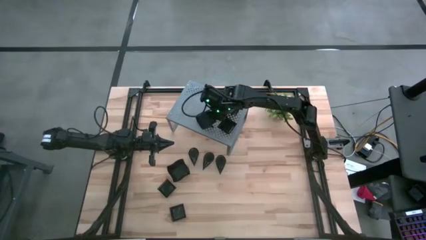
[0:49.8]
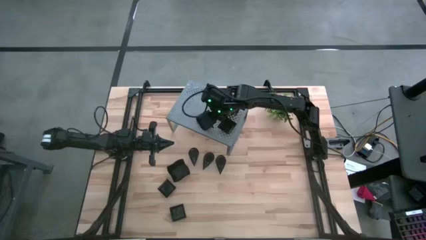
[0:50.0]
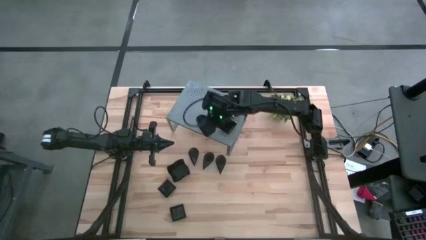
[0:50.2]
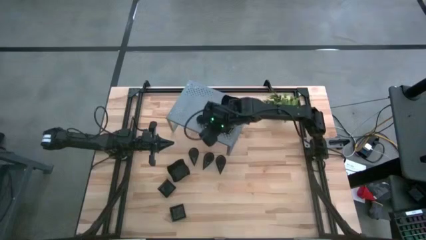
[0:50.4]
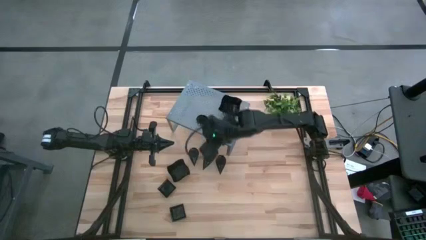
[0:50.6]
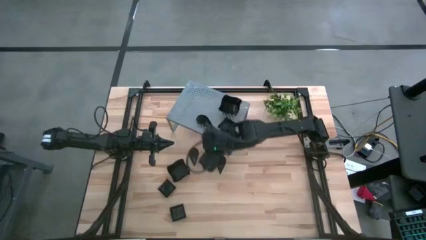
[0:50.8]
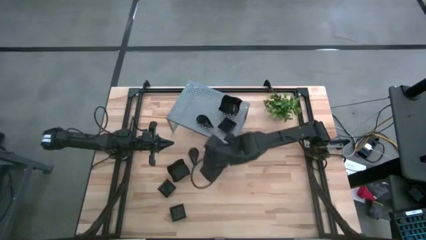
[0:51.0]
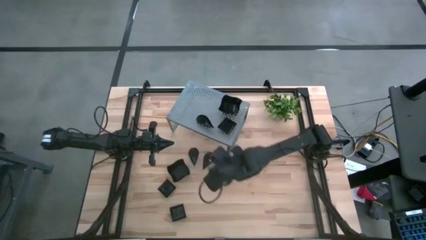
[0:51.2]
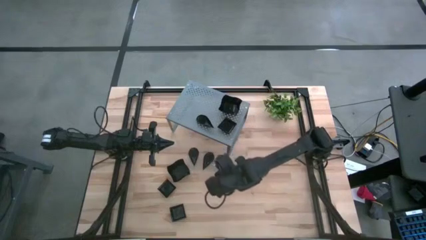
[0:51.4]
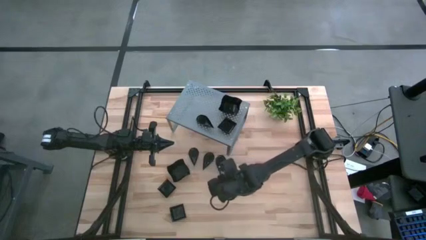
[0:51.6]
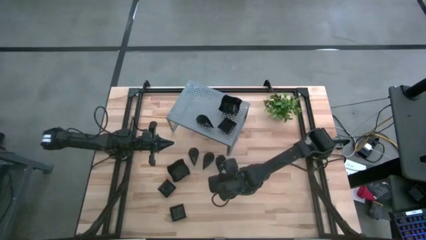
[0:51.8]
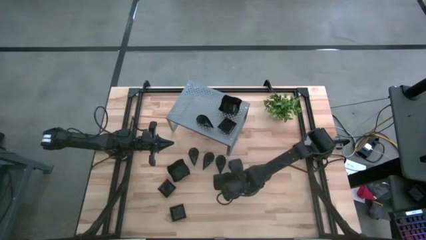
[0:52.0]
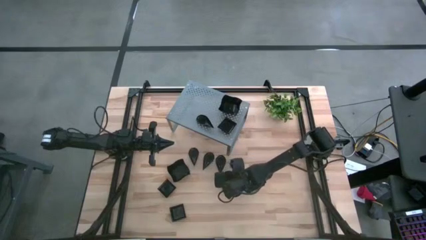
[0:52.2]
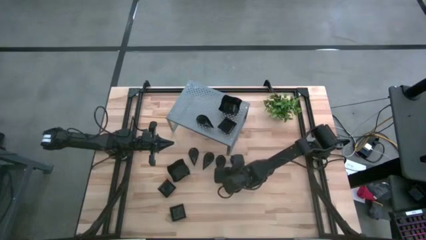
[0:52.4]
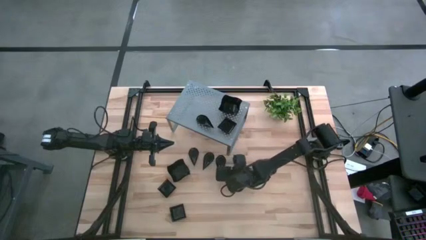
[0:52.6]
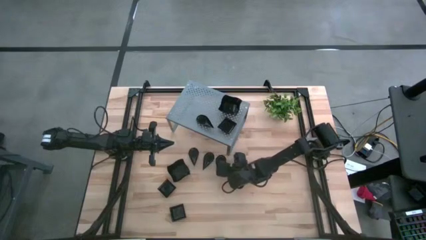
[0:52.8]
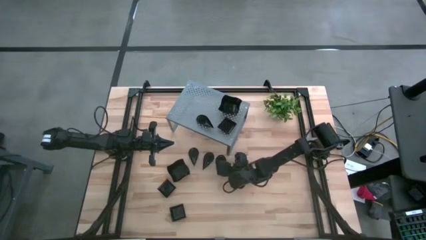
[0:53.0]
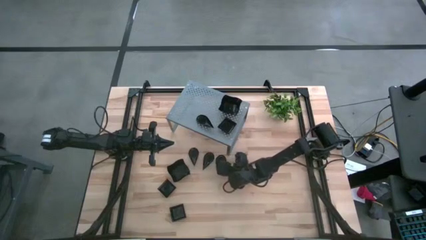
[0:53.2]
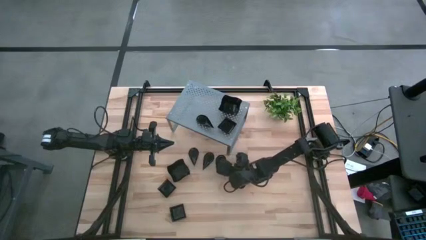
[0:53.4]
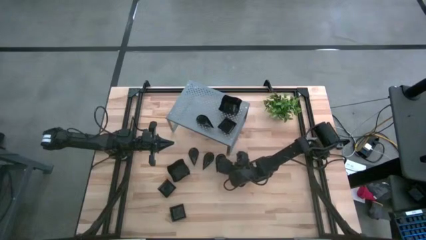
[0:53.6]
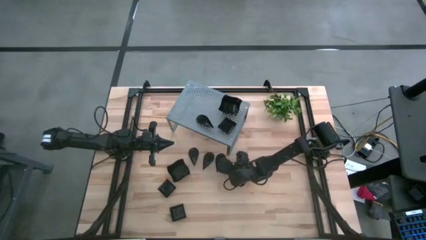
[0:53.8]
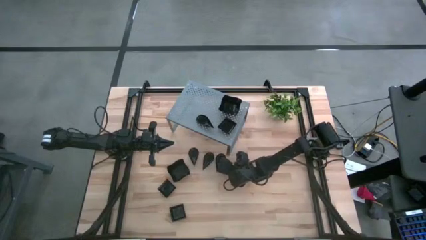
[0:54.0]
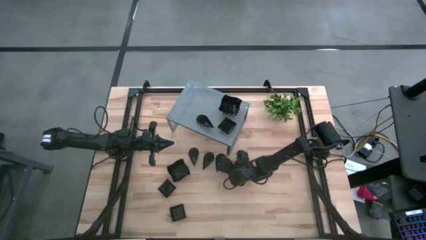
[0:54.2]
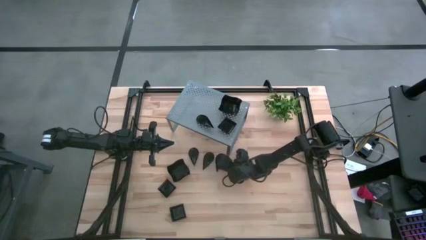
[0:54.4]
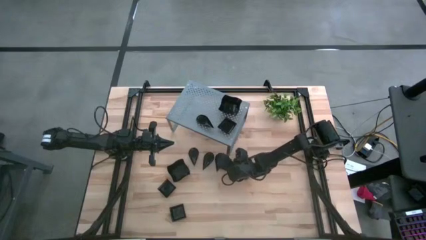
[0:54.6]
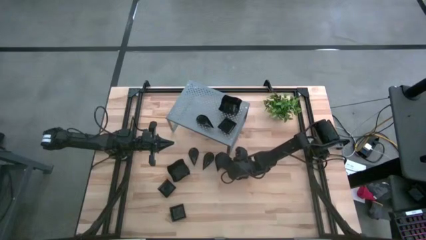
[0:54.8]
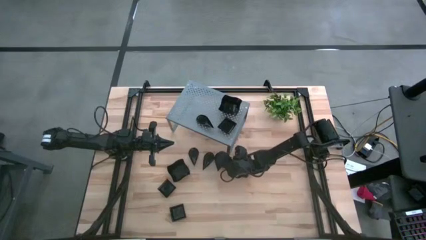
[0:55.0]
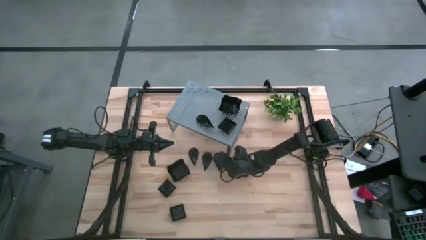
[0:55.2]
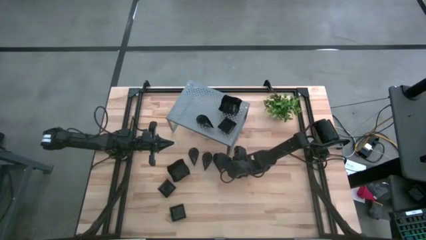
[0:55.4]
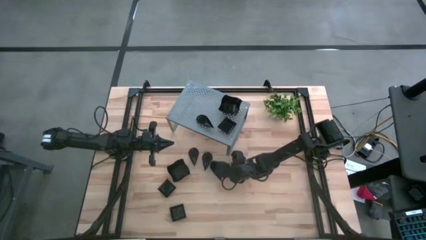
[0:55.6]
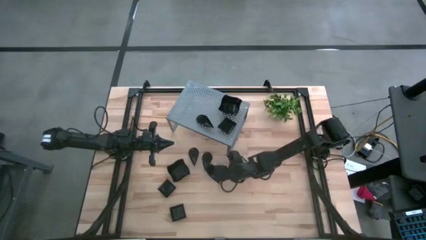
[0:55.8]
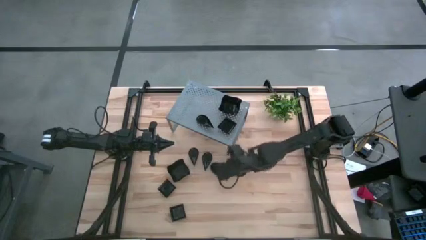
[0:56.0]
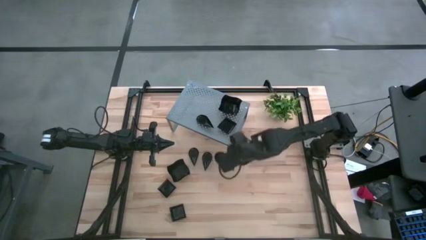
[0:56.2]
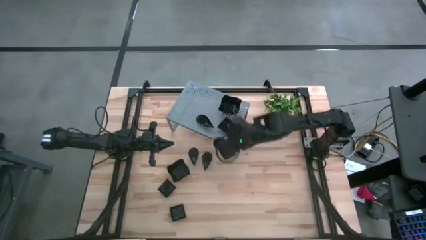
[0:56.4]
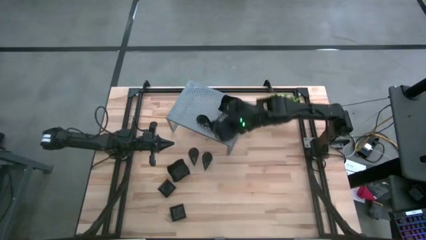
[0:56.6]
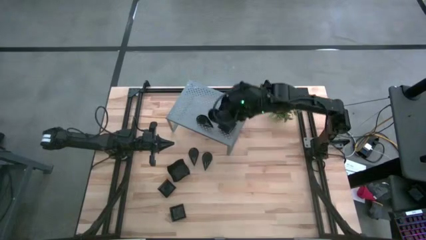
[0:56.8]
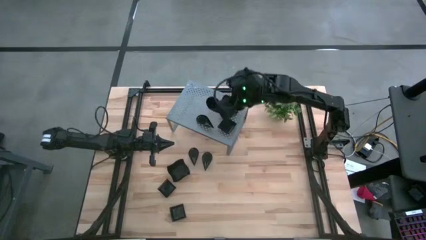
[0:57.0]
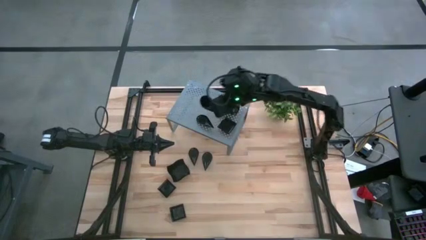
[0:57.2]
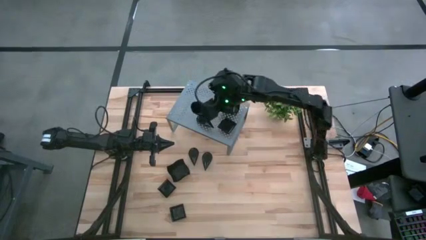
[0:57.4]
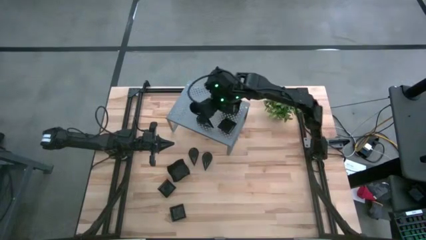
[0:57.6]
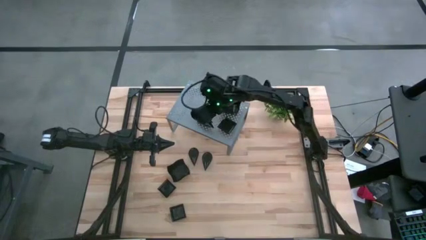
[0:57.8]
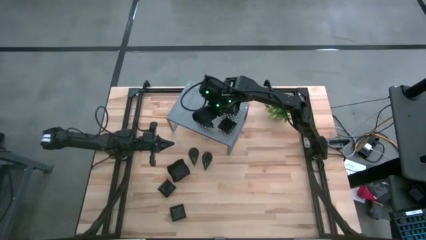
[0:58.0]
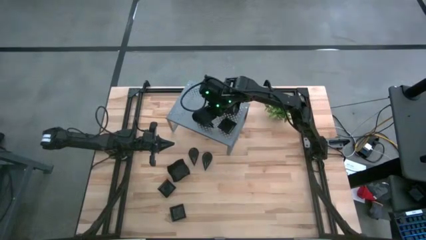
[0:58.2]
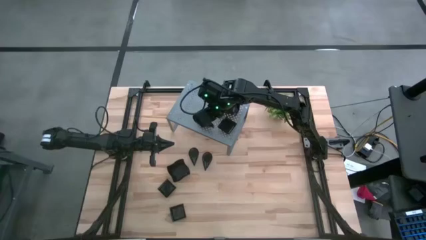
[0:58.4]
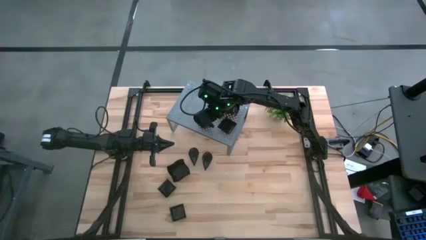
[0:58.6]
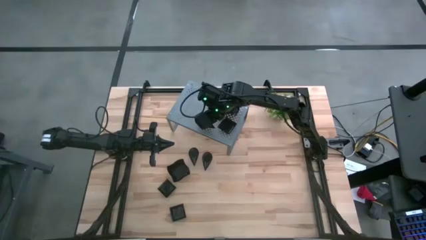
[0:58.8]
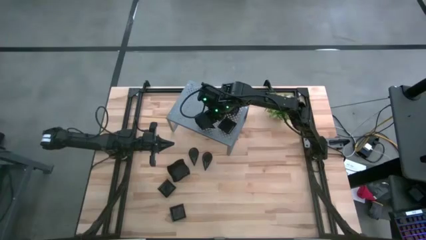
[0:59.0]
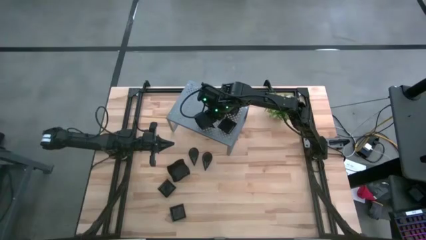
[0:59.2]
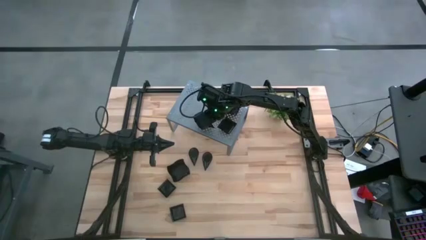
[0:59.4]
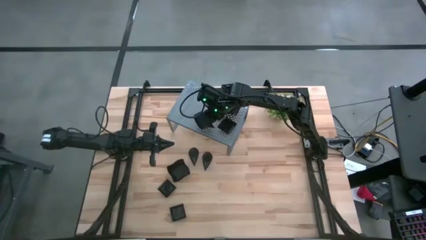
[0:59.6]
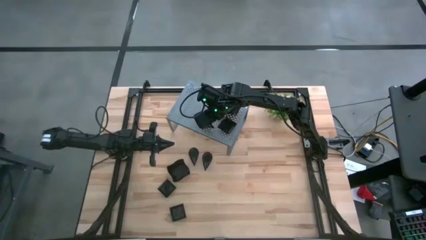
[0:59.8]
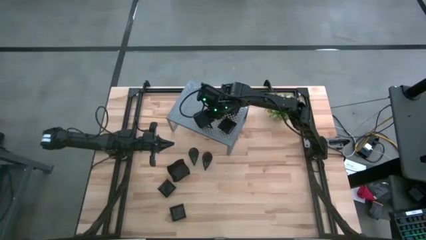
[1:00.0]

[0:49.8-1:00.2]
Task: Pick & Place Mini shaped plates
Stack the right drop shaped plate into the drop shaped plate on the shelf

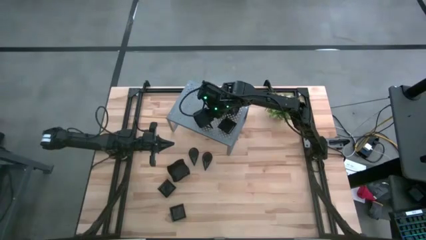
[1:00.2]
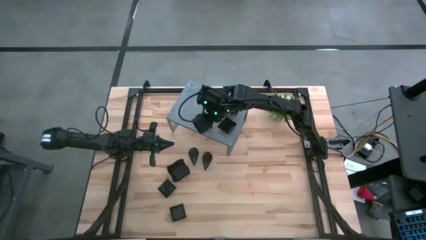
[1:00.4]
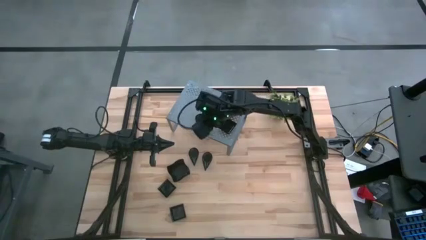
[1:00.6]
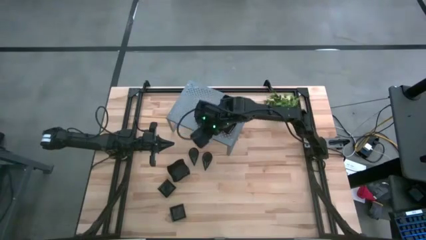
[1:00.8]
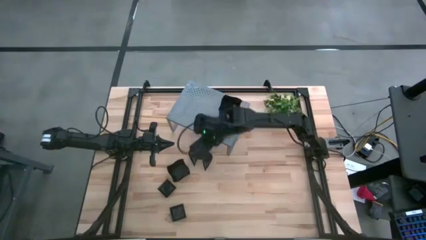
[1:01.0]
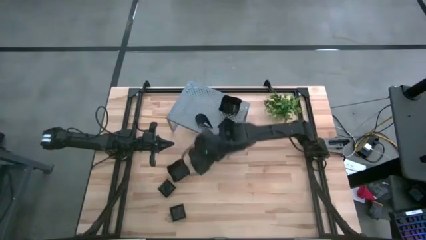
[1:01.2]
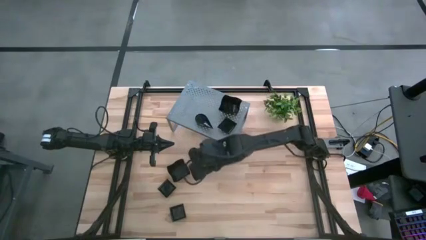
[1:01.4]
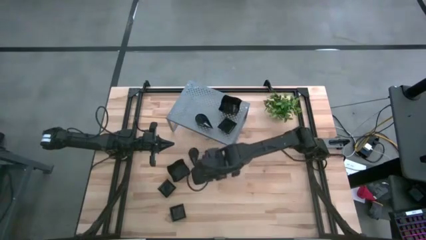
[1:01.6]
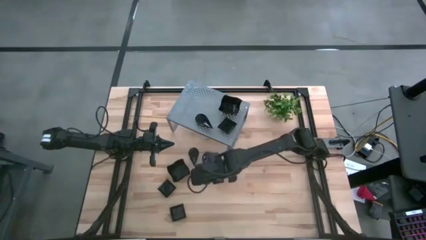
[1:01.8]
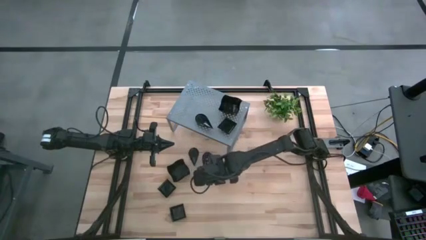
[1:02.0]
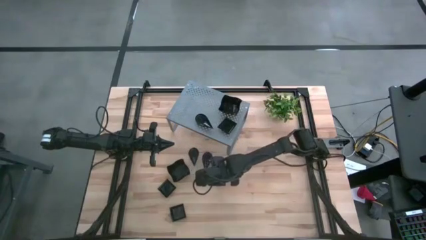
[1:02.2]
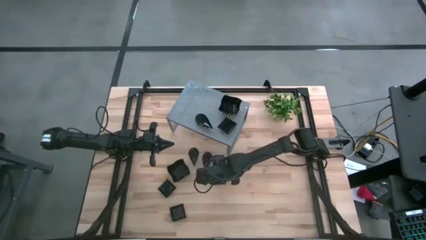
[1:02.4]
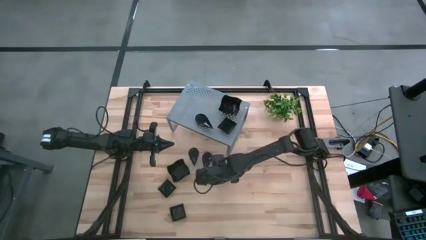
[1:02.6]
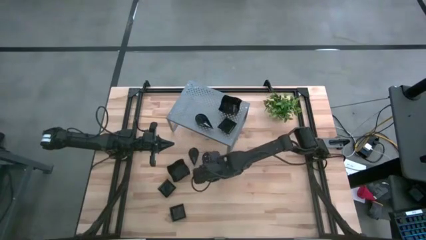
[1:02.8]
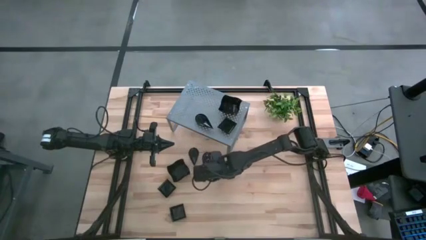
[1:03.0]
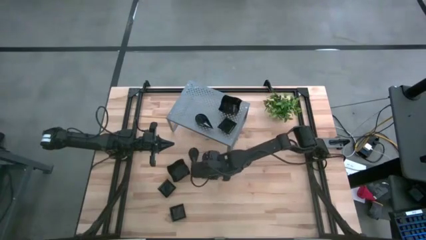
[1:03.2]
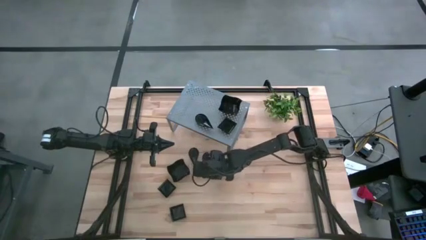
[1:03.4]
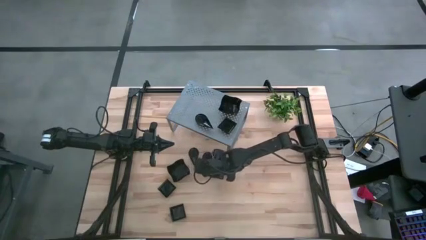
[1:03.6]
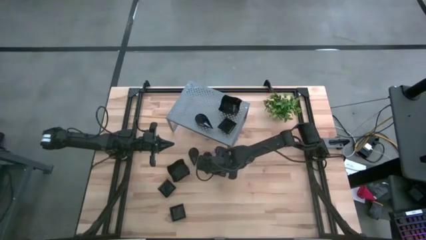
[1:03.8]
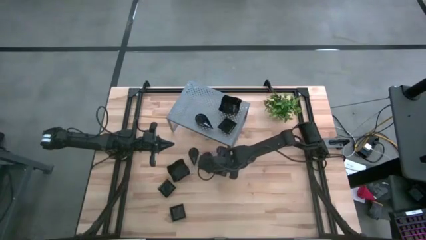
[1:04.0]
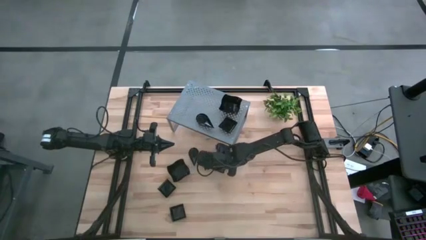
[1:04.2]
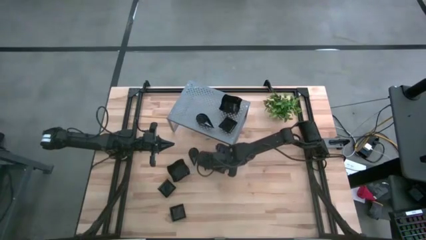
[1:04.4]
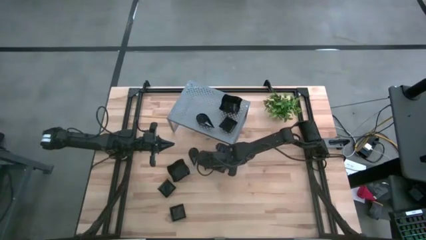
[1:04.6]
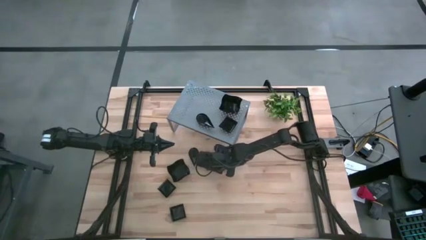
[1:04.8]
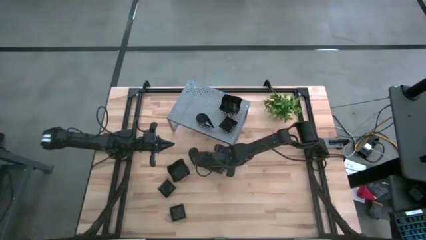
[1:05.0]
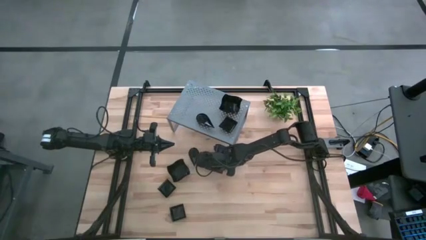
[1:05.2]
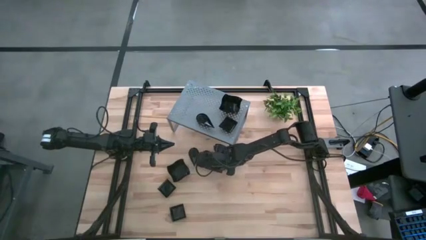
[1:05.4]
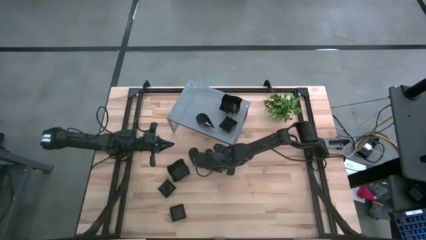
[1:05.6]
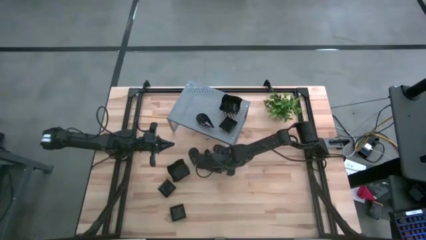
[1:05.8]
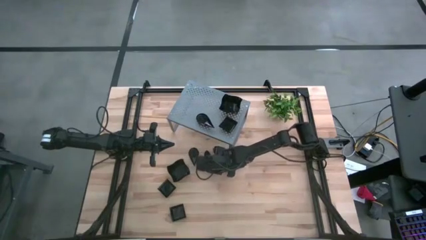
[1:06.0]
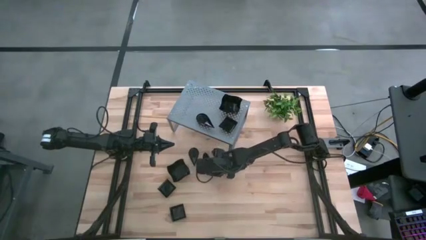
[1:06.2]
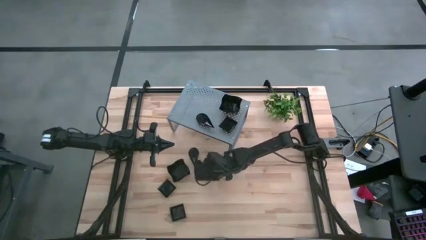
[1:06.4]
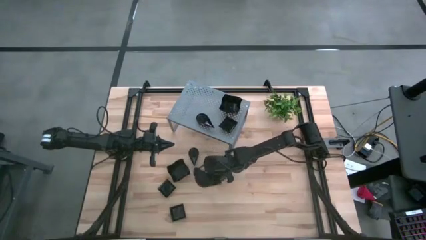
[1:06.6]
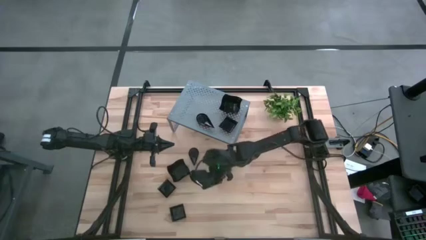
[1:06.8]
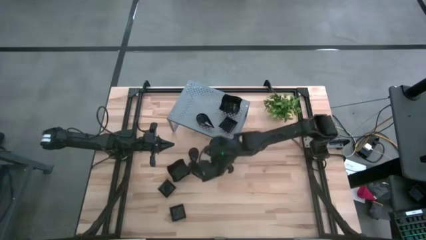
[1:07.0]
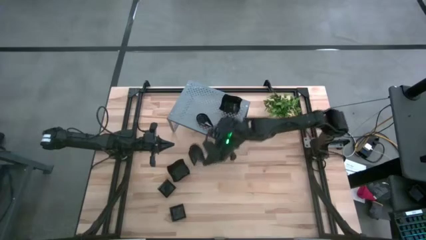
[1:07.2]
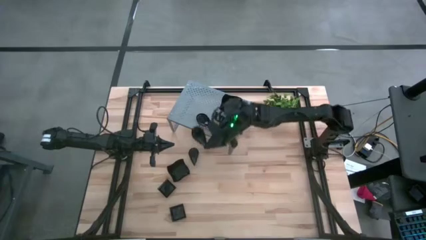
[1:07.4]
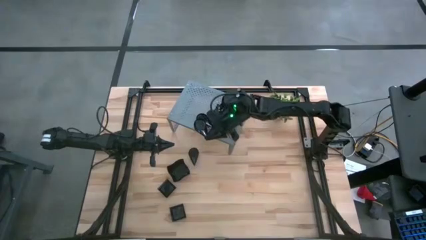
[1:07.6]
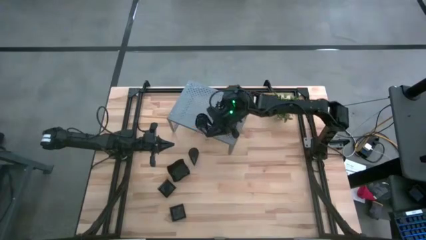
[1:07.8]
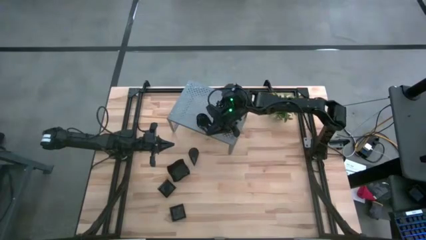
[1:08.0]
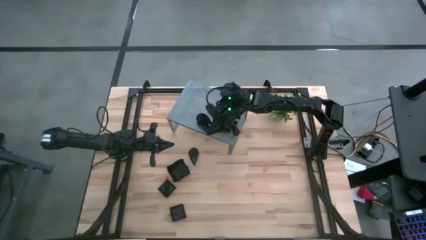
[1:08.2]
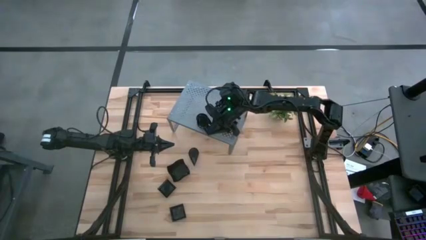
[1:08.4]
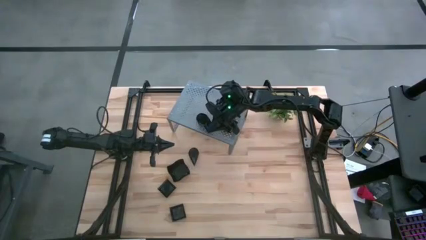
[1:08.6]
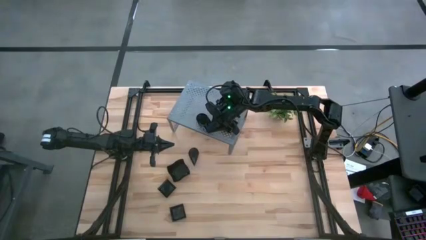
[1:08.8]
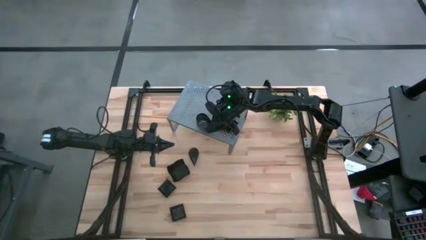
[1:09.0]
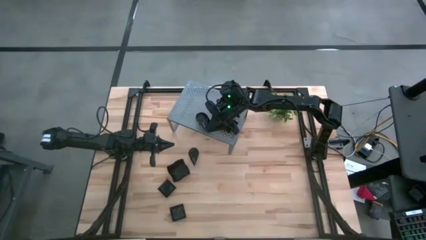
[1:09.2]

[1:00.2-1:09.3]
Stack the right drop shaped plate into the drop shaped plate on the shelf
